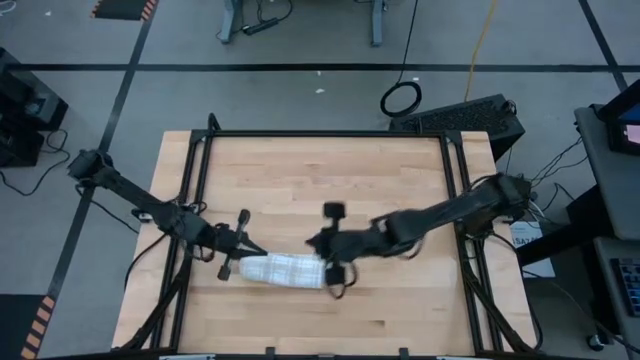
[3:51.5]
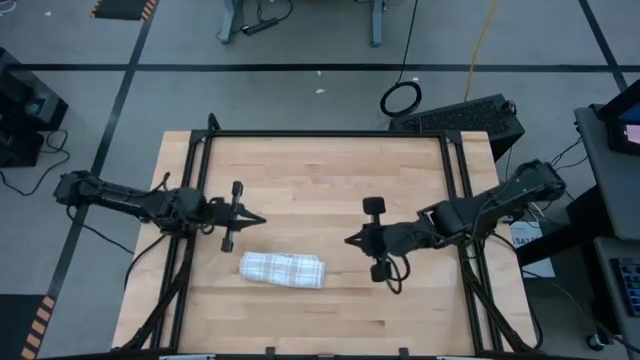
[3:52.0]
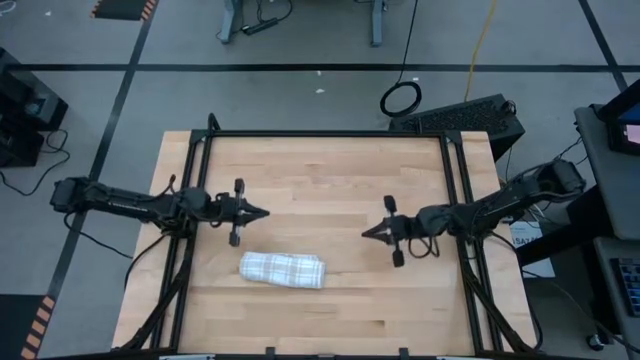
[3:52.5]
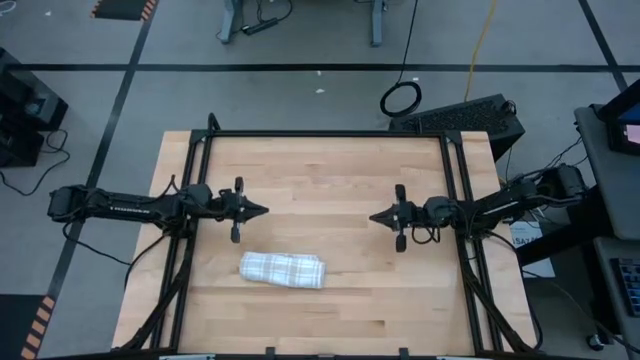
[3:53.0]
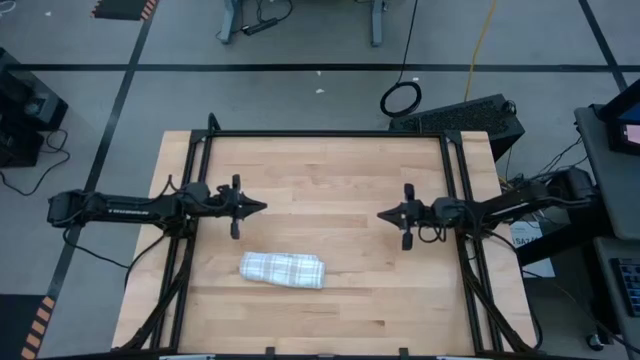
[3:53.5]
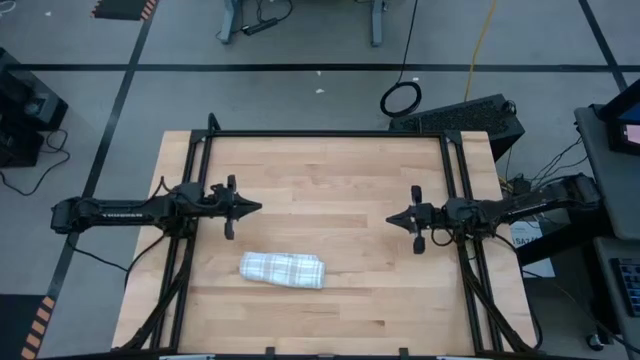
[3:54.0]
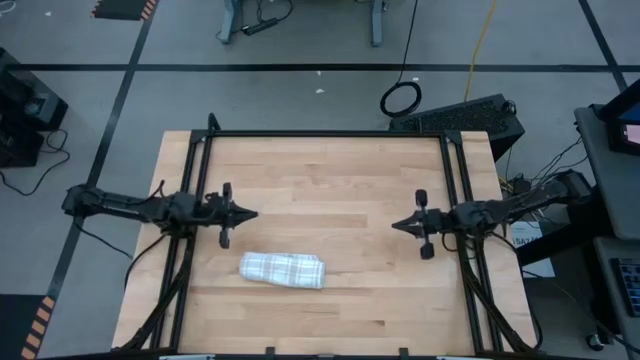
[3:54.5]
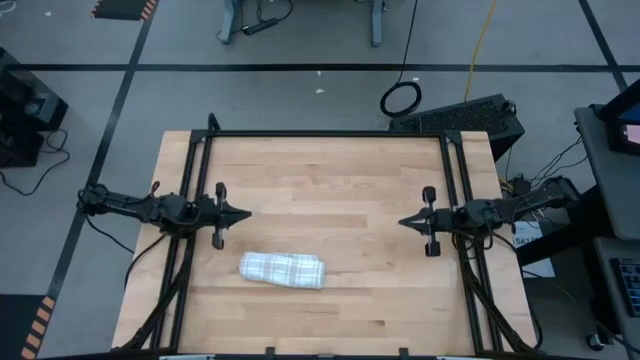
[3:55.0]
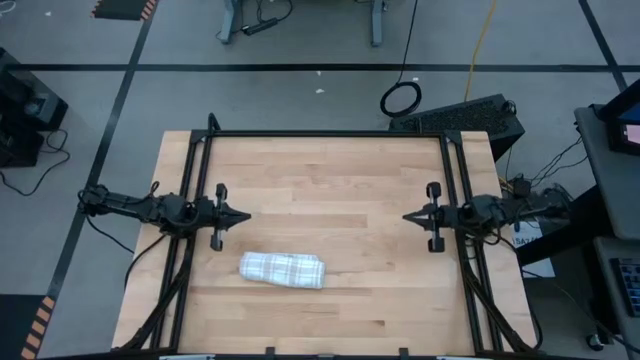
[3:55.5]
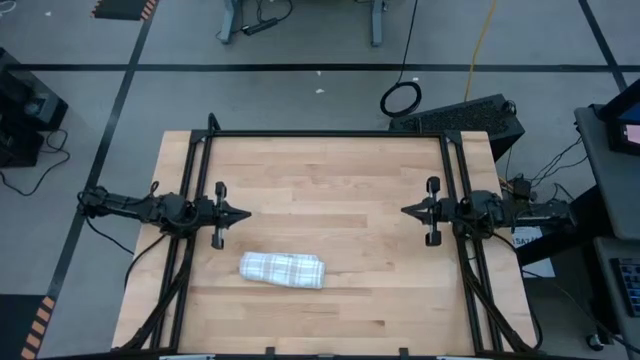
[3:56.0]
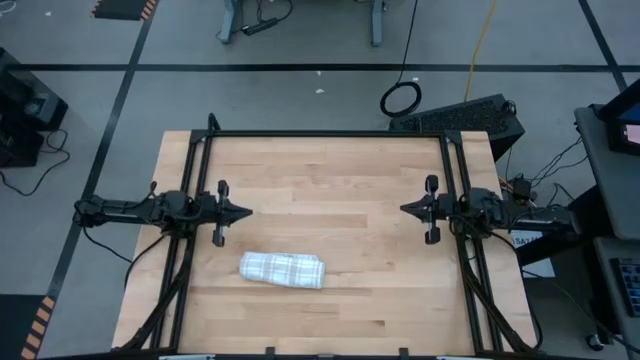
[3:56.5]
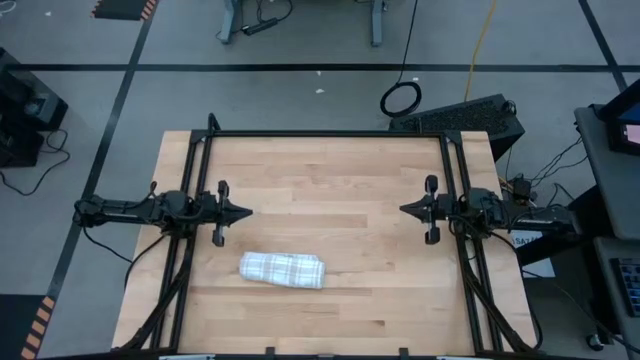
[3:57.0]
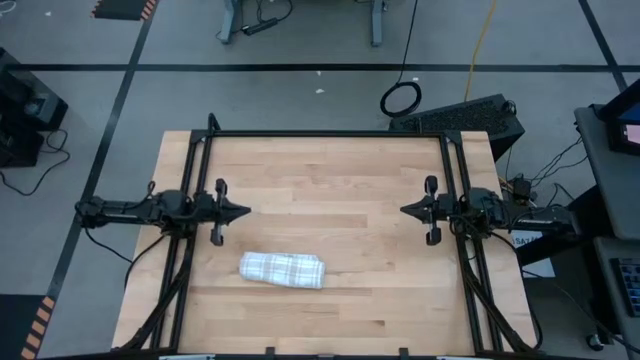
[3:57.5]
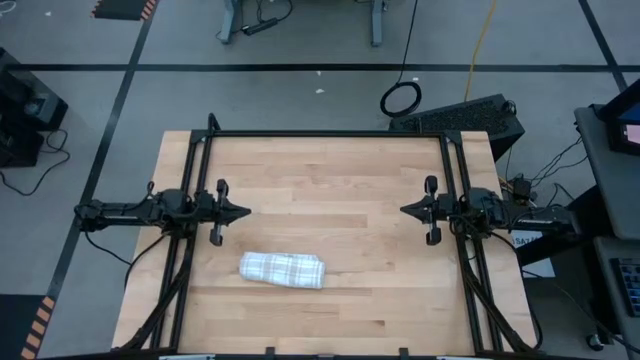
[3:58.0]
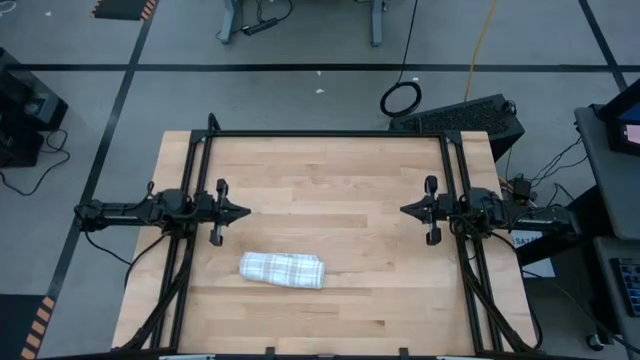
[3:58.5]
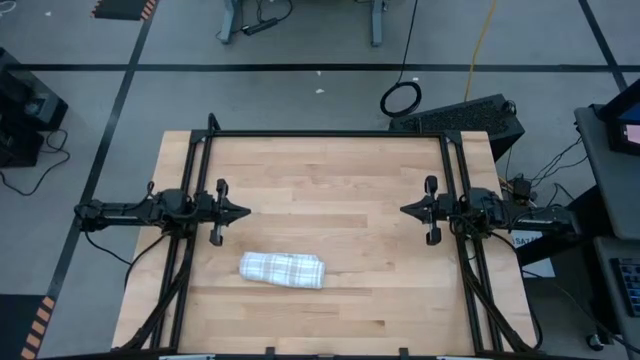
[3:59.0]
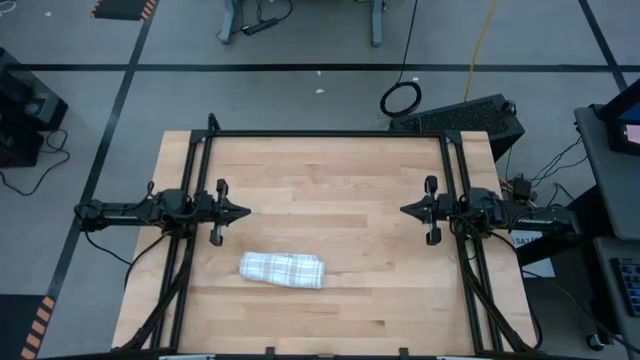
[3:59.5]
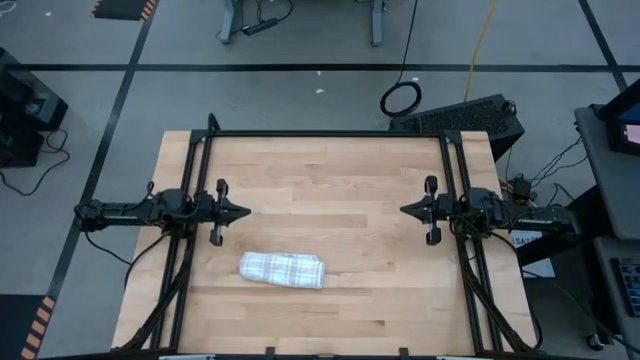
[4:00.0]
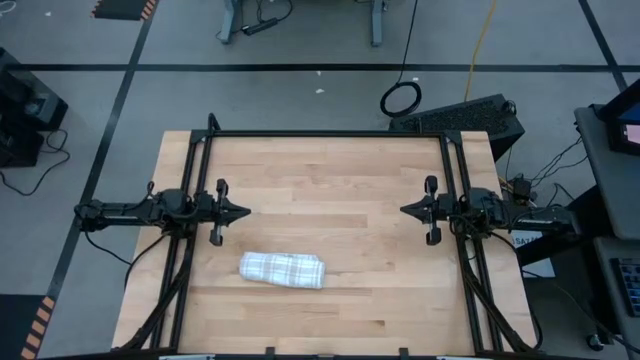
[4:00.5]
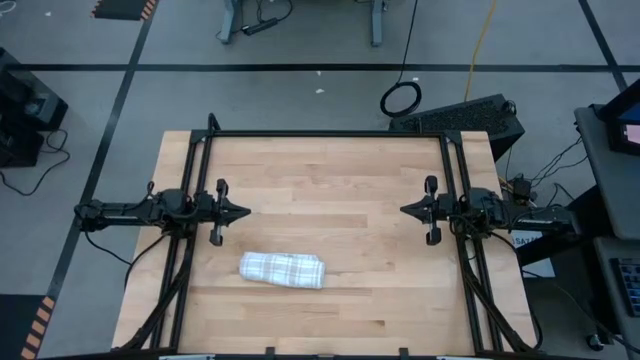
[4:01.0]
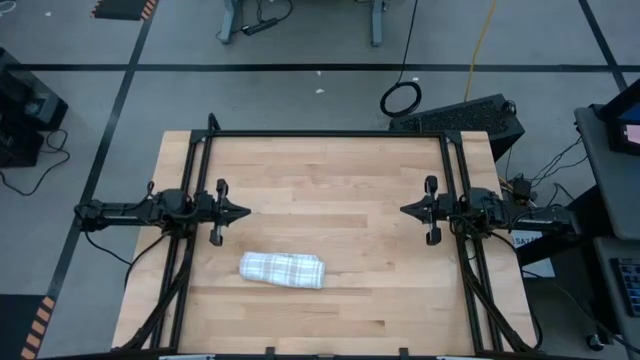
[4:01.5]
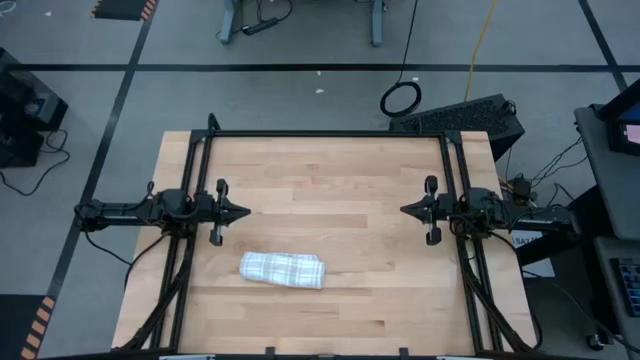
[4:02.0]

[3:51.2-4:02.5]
Task: Roll towel
Return to Home Position

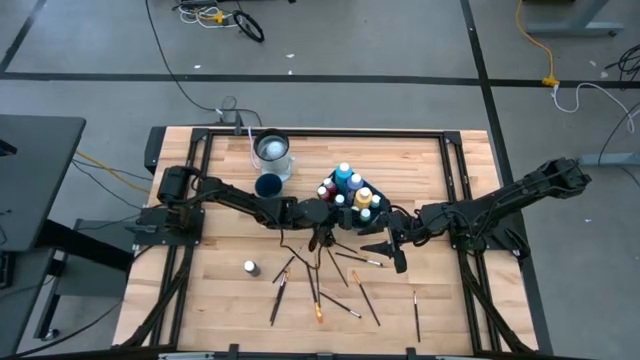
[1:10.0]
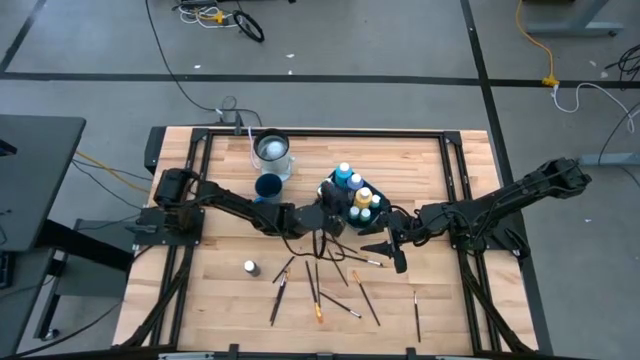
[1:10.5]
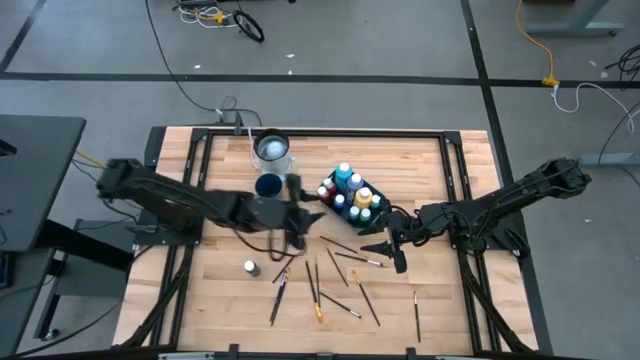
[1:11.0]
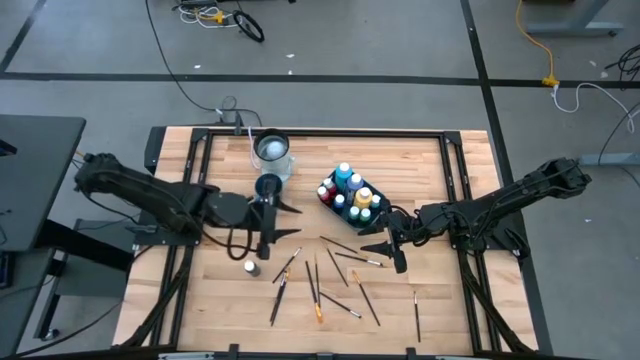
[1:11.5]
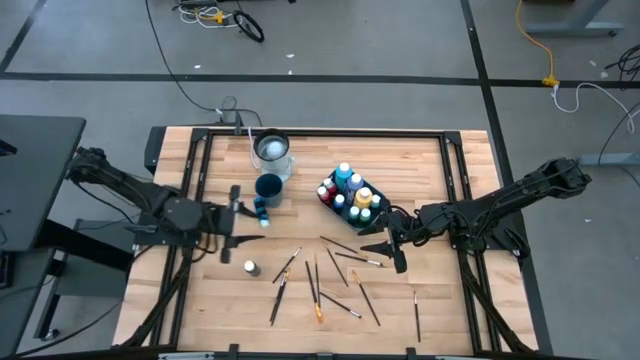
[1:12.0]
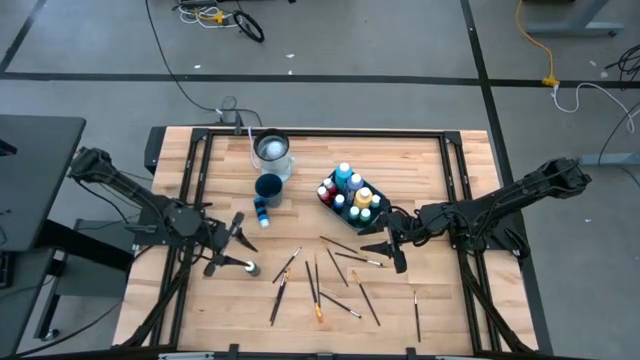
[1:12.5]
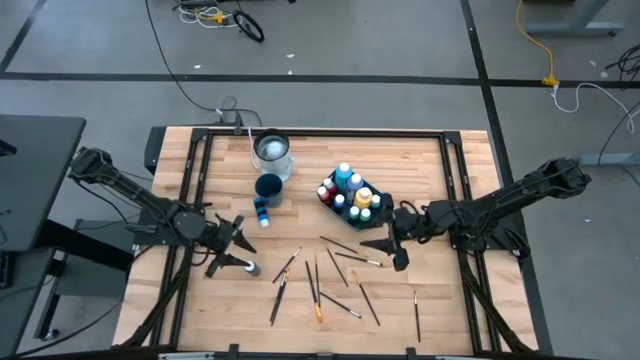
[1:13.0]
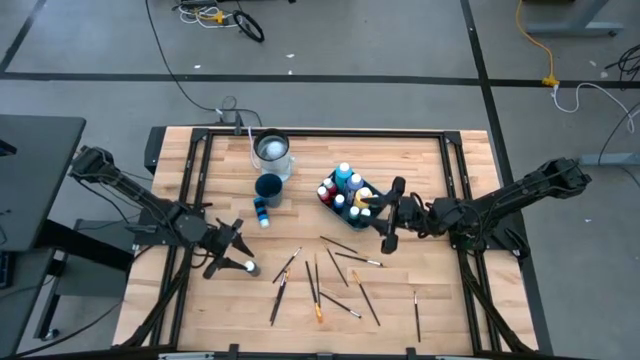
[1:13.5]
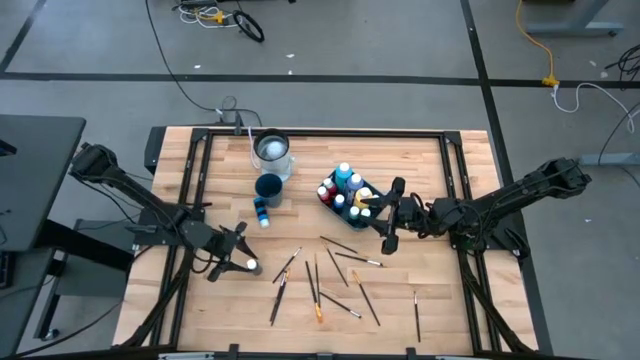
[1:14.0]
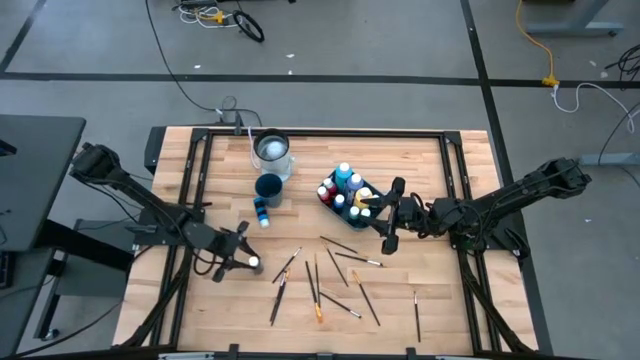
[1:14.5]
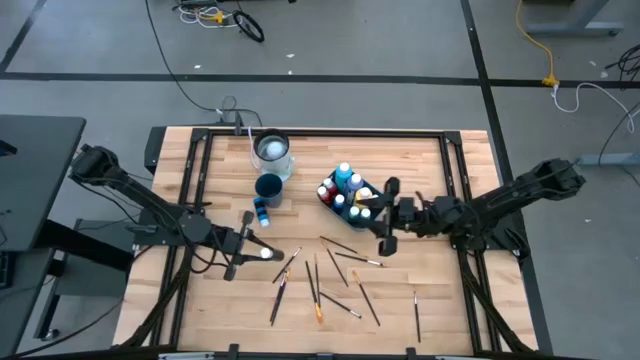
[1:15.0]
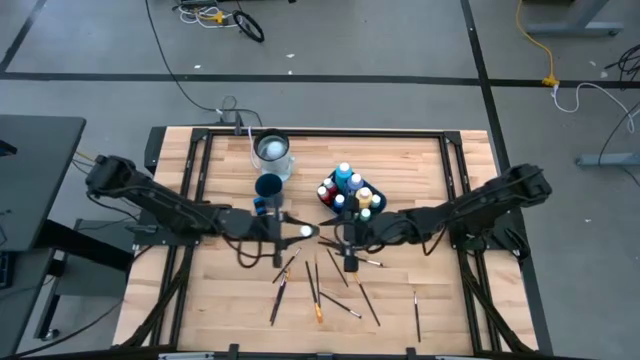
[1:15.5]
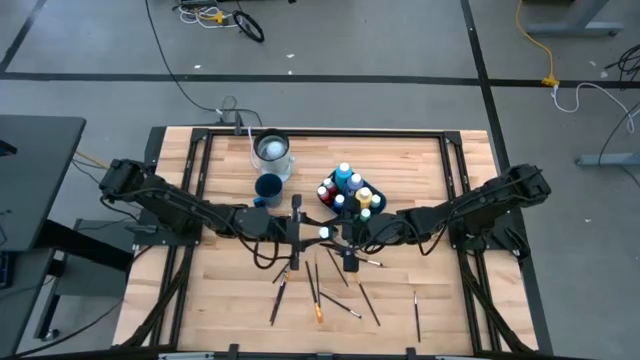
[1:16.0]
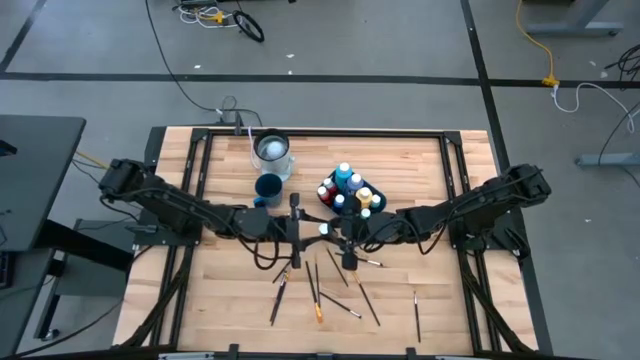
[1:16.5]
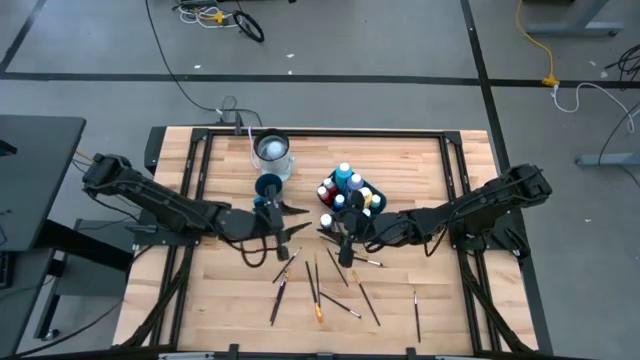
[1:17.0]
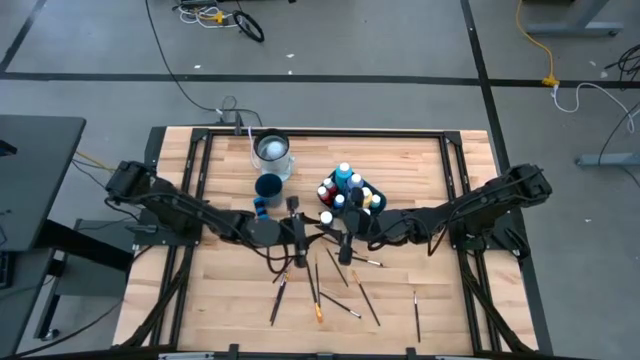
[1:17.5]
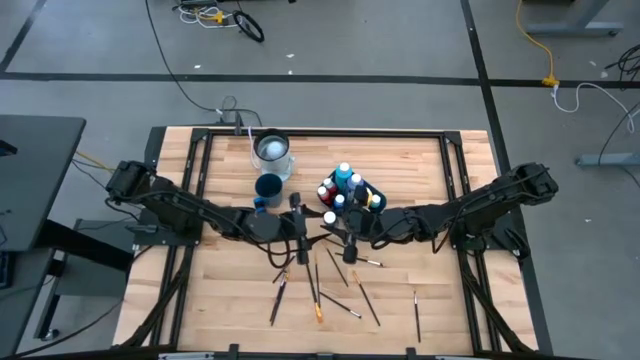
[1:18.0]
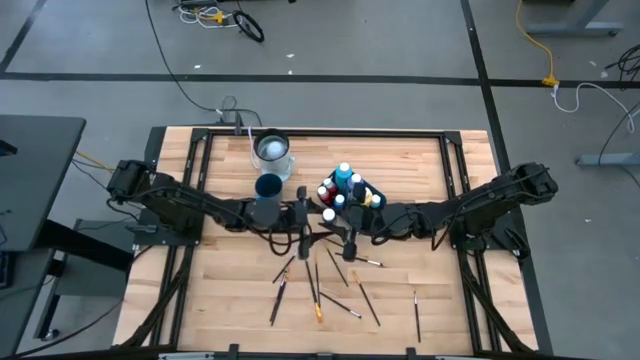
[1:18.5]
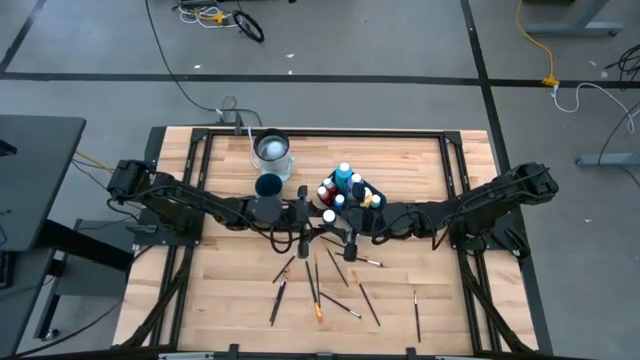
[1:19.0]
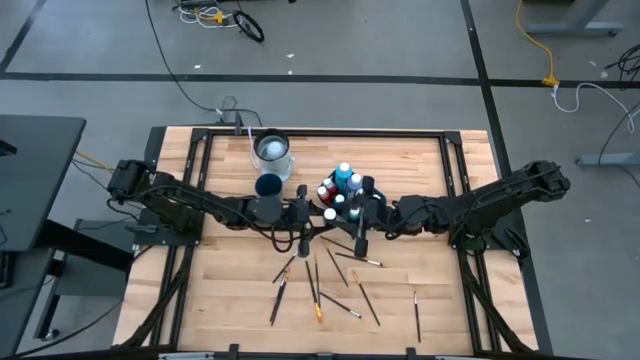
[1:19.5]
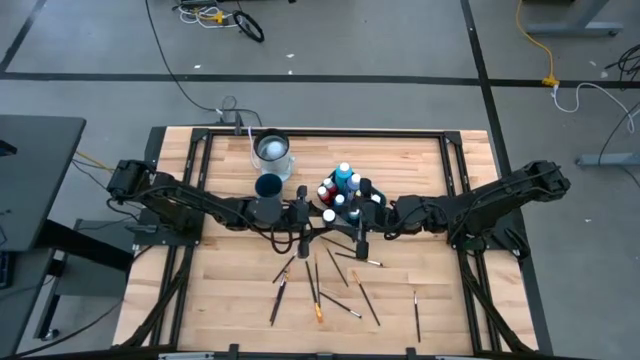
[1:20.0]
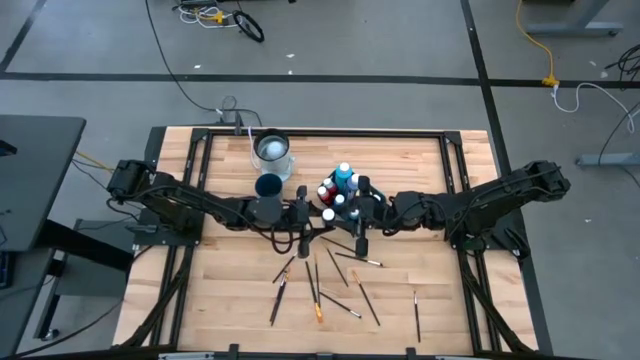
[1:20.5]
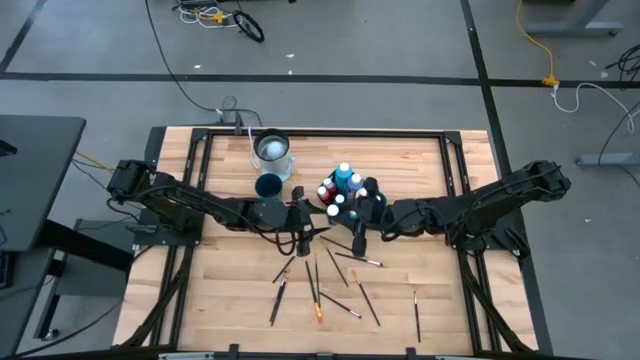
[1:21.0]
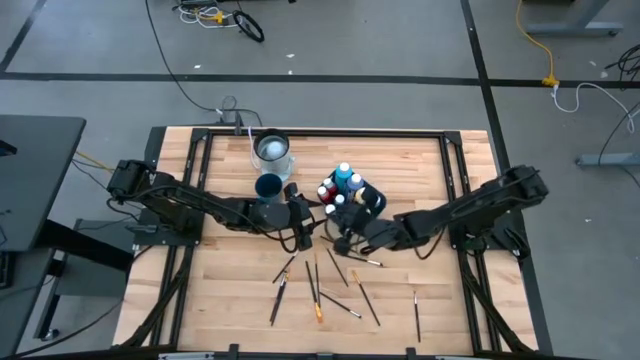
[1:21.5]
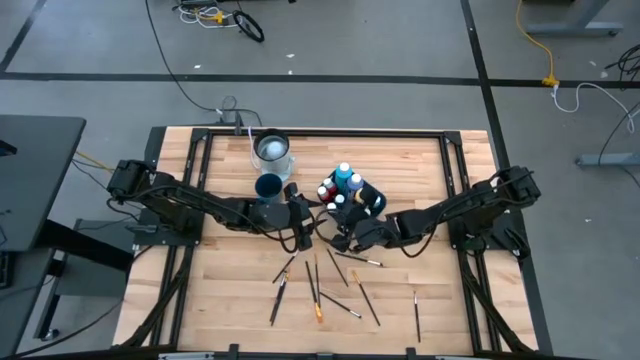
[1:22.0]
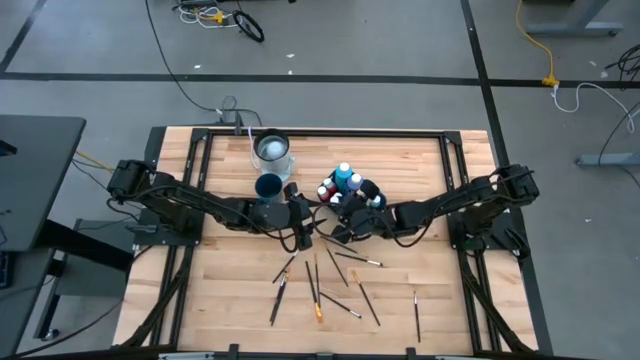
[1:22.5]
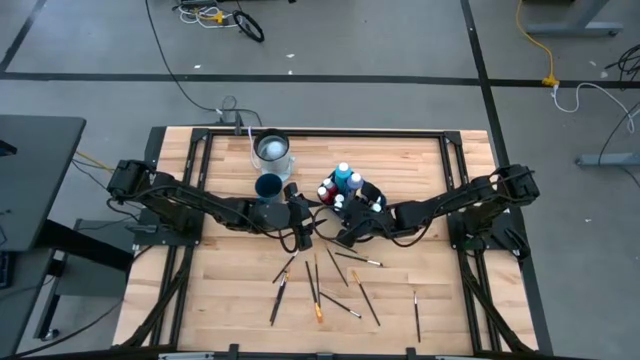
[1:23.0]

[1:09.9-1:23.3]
Task: Pick & Place Paint Supplies
Put the black paint bottle into the blue bin
